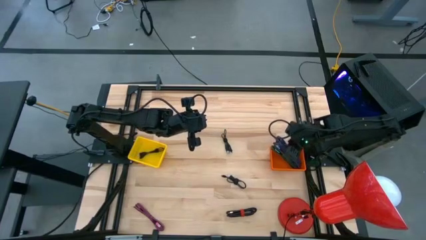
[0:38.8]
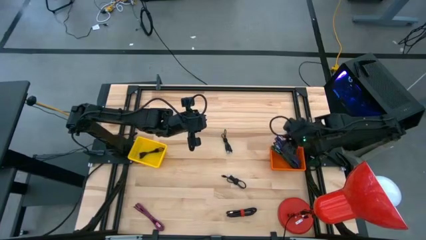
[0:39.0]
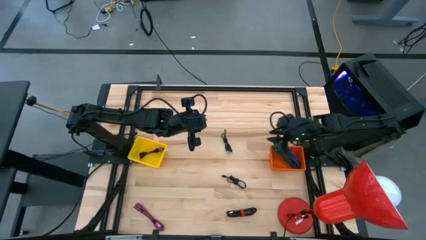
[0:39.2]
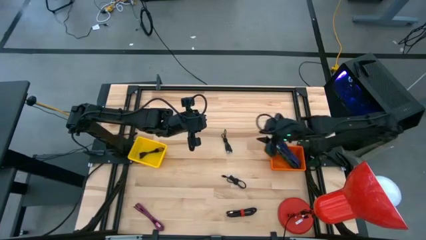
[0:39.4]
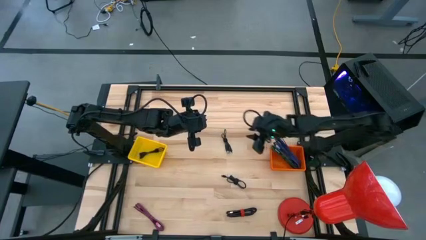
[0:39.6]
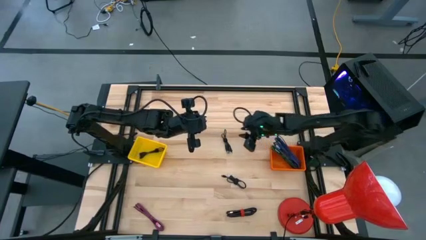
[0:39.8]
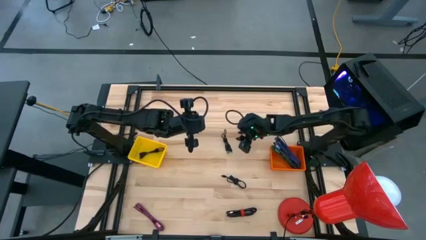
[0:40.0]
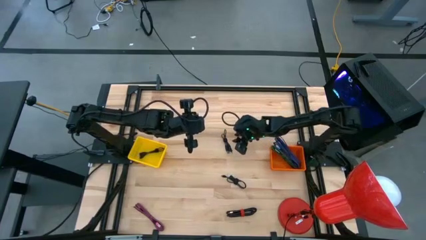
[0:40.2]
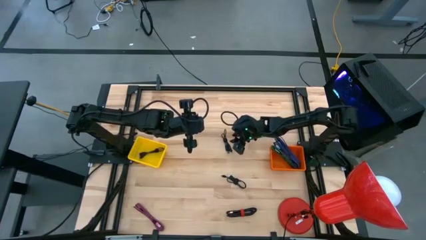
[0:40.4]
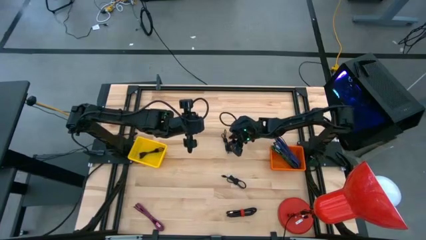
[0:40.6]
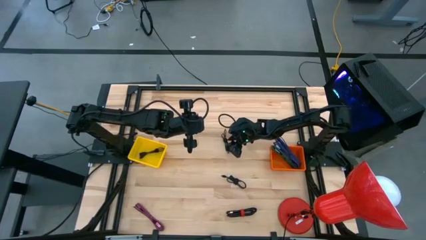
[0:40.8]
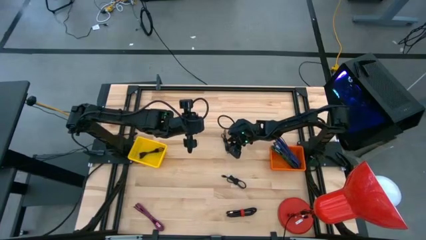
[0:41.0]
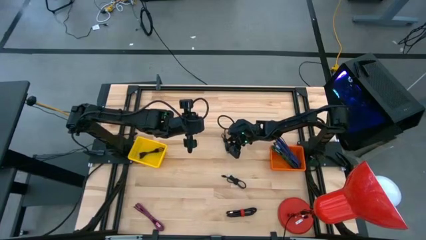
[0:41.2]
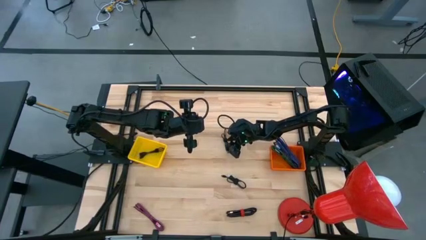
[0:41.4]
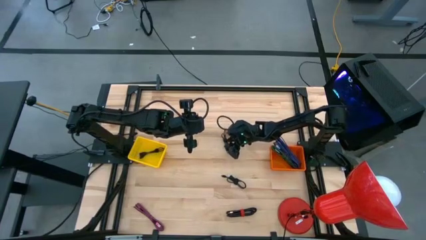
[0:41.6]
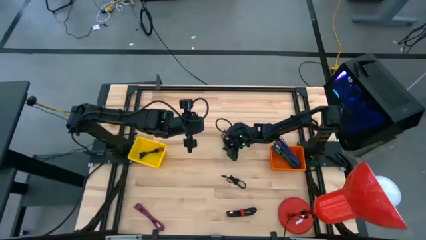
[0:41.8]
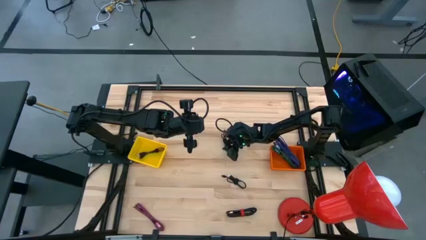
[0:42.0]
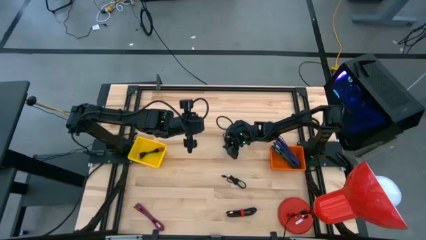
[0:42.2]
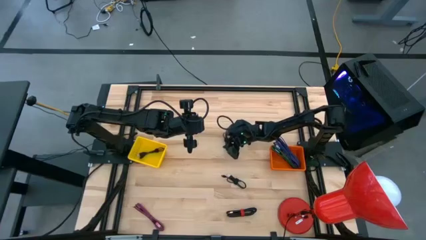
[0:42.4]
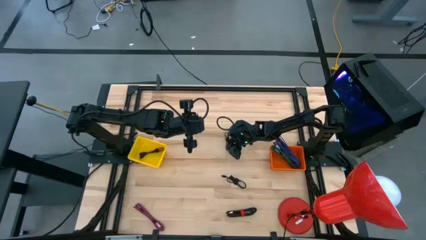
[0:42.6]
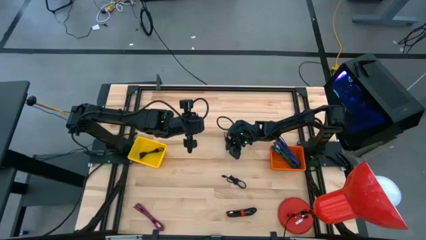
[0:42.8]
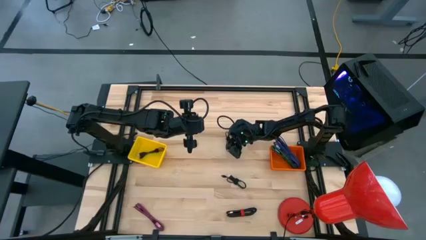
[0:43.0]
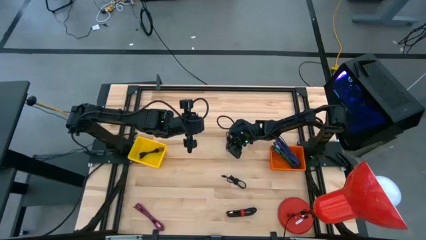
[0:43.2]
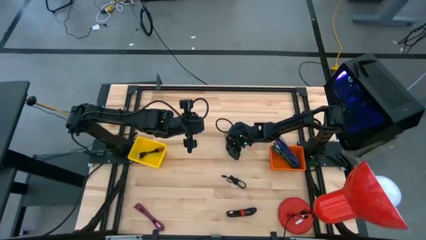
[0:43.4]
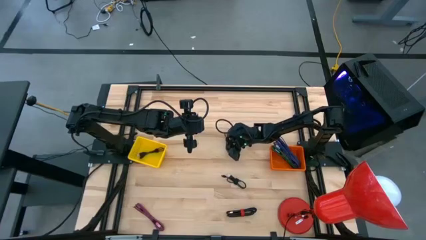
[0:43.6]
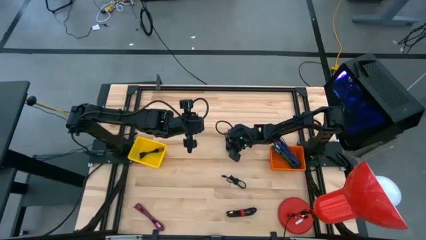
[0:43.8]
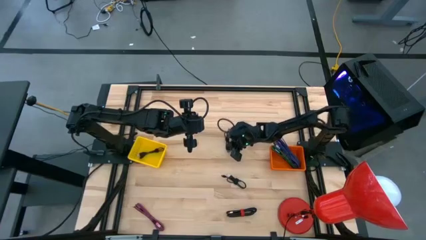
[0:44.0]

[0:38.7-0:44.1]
Task: Pick & Place USB Port
Put the black charger cable into the yellow basket

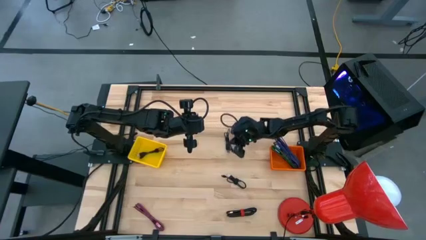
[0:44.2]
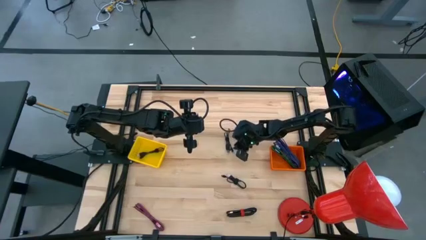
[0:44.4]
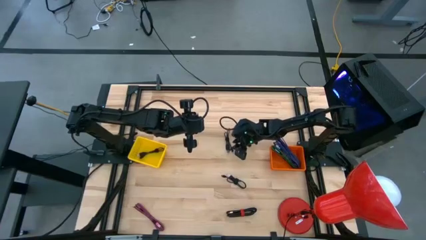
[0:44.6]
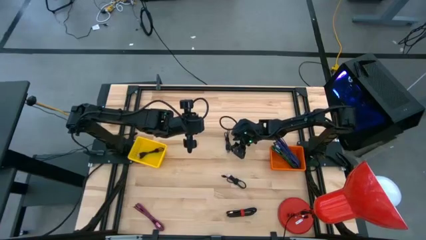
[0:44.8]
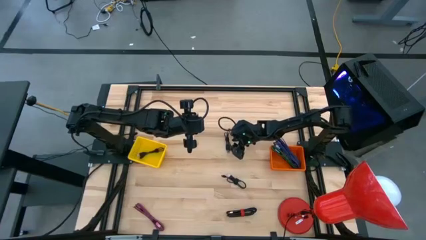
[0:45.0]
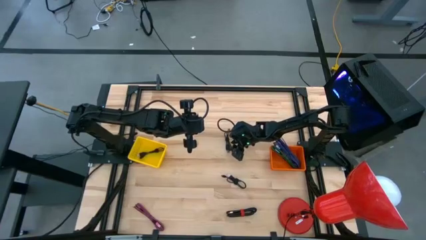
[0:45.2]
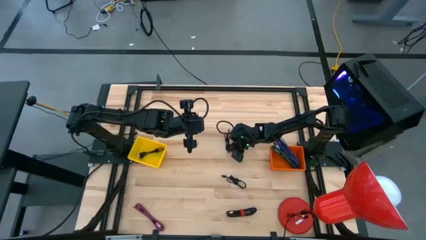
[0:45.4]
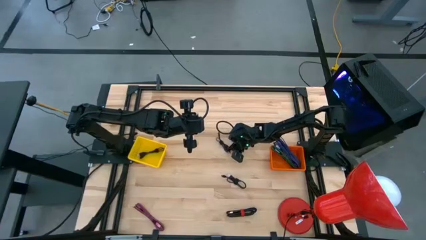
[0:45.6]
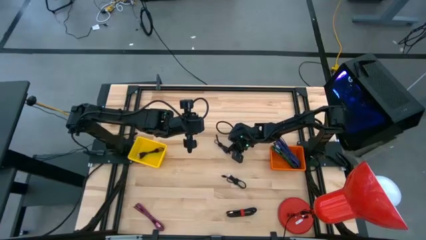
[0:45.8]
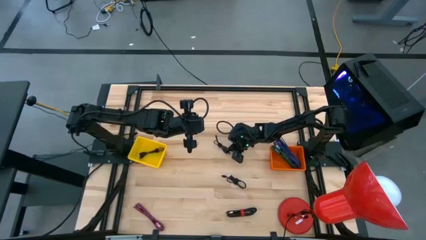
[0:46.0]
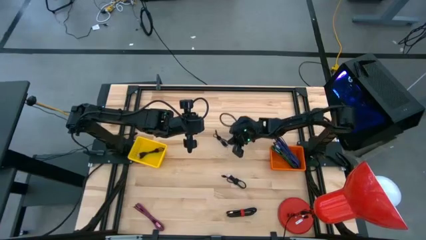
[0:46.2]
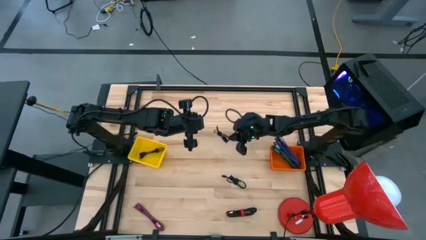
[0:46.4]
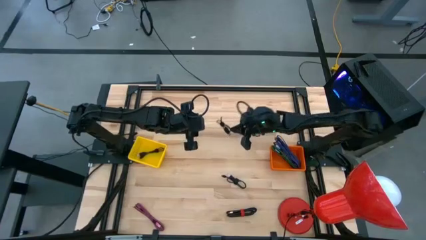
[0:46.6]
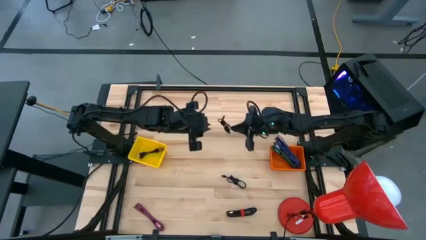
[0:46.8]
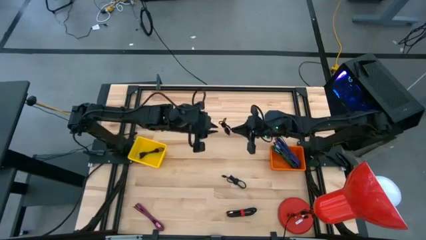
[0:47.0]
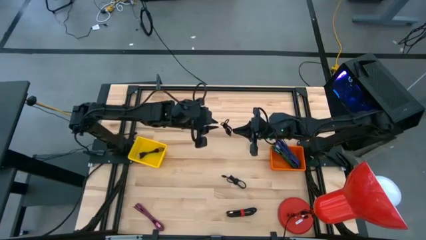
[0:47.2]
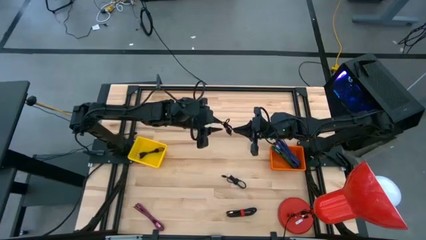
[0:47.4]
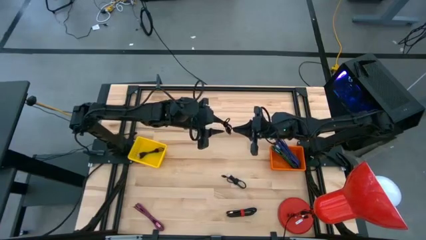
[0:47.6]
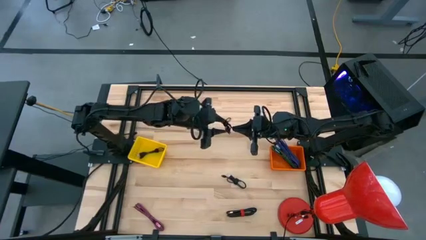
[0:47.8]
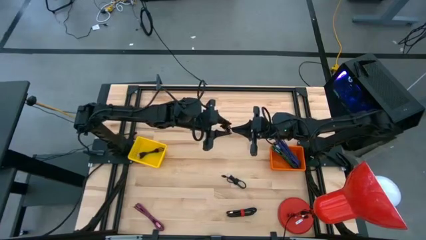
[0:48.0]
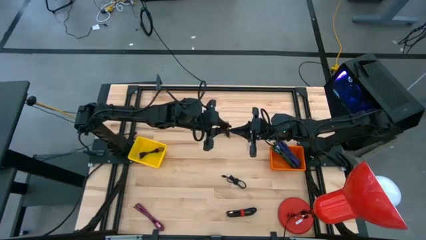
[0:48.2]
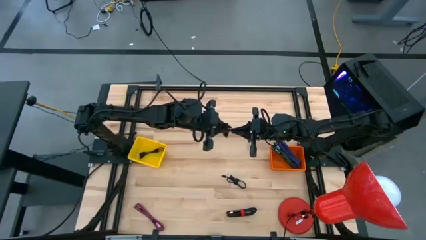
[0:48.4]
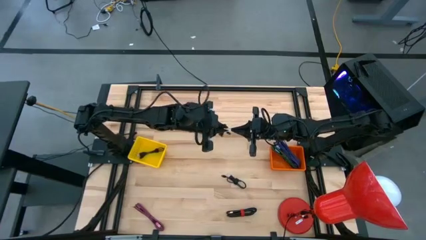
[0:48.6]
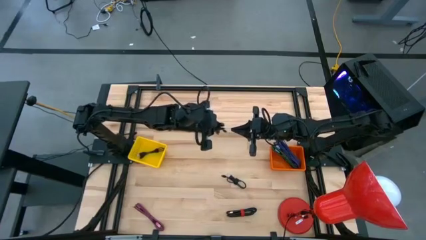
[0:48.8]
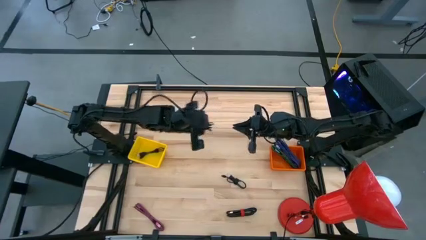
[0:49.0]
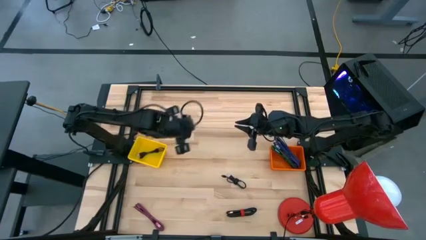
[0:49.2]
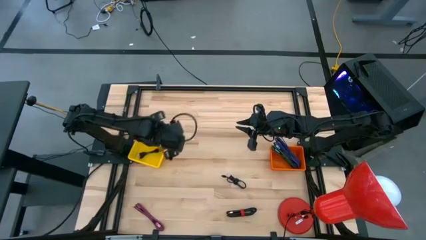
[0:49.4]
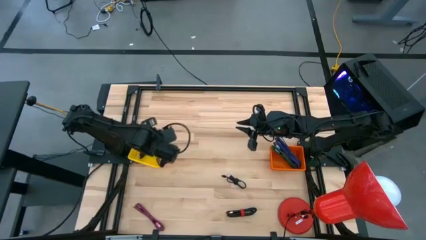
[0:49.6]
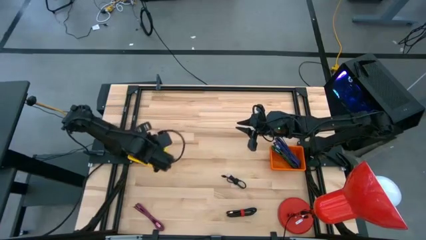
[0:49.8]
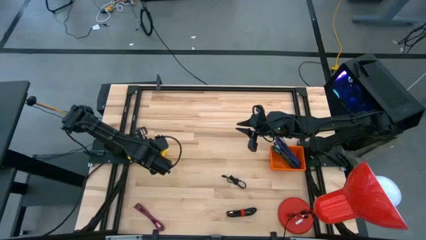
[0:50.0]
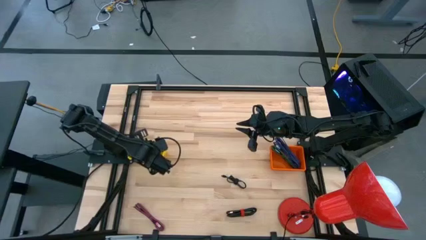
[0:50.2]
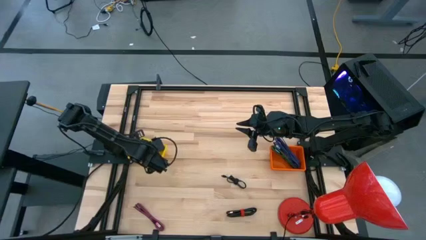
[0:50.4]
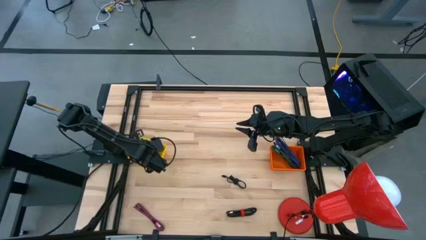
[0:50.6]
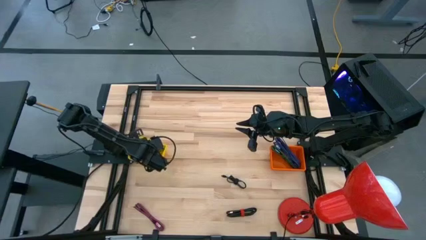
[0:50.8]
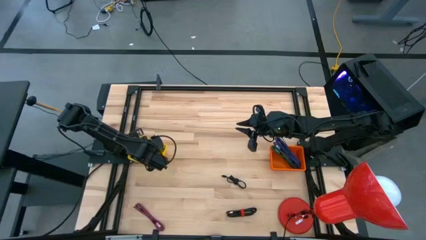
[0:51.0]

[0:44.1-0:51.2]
Put the black charger cable into the yellow basket

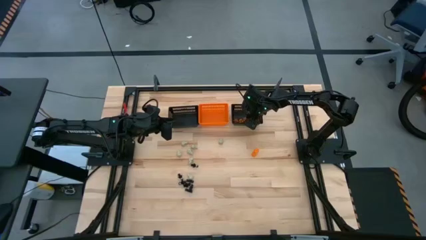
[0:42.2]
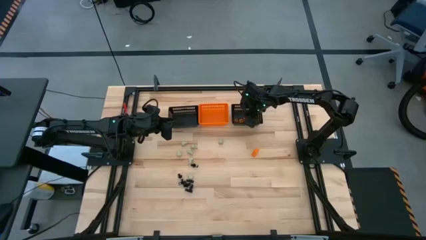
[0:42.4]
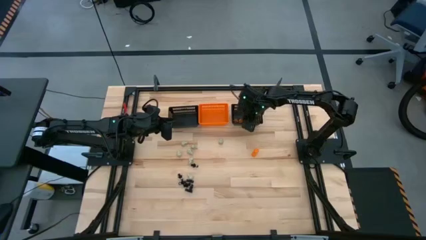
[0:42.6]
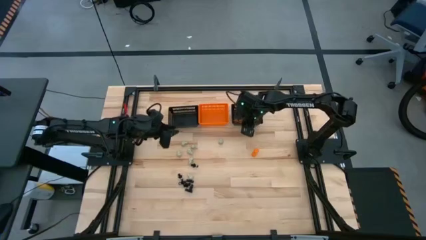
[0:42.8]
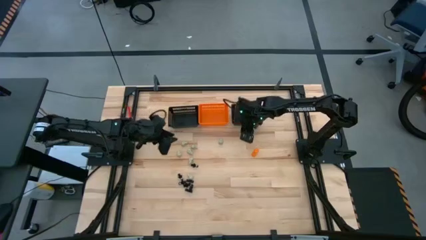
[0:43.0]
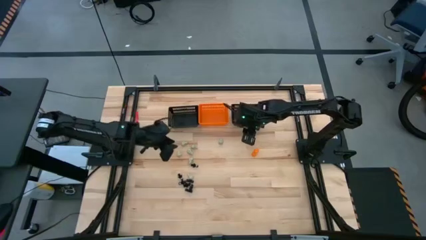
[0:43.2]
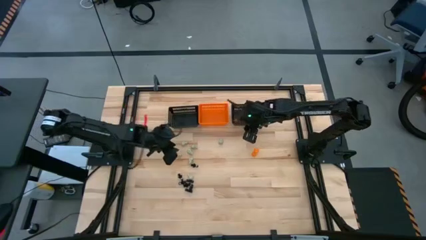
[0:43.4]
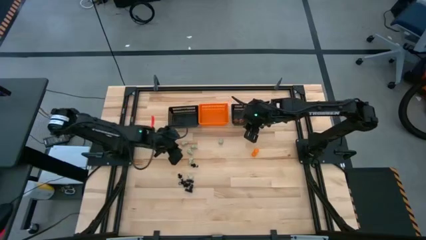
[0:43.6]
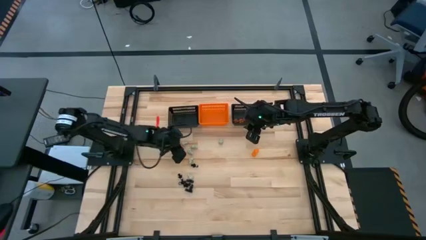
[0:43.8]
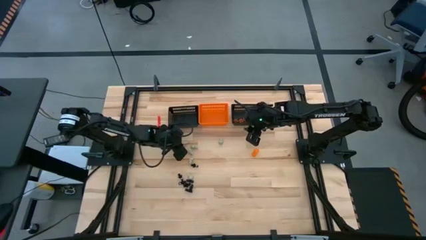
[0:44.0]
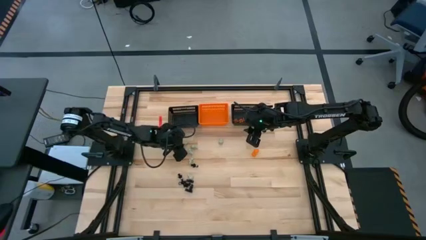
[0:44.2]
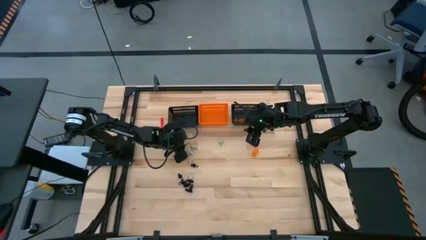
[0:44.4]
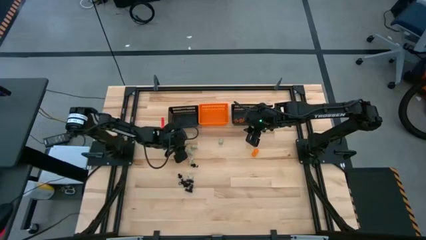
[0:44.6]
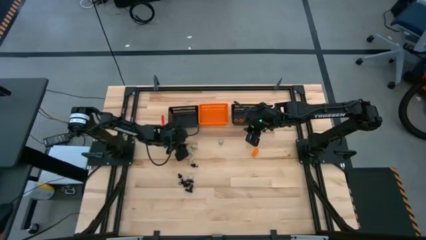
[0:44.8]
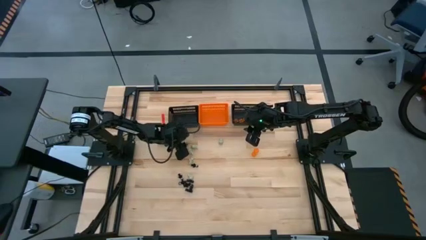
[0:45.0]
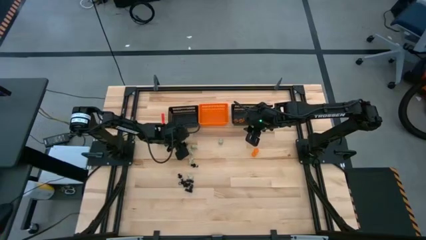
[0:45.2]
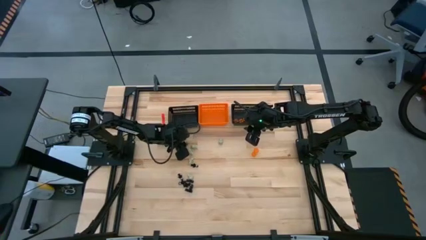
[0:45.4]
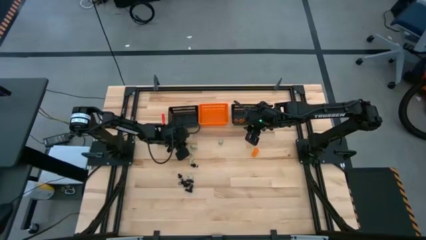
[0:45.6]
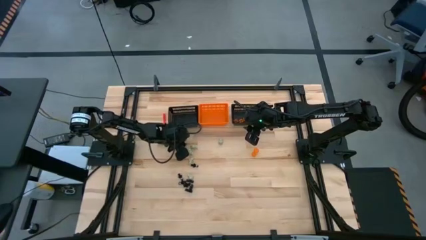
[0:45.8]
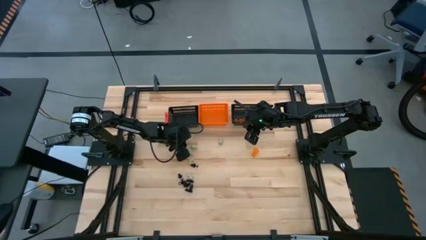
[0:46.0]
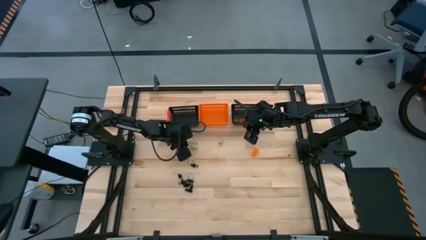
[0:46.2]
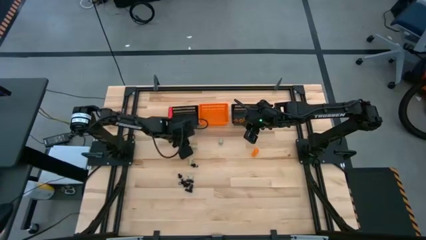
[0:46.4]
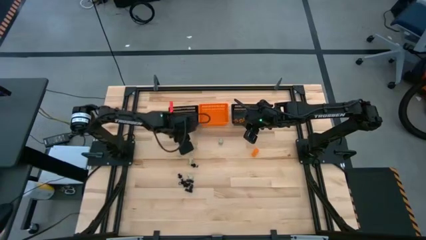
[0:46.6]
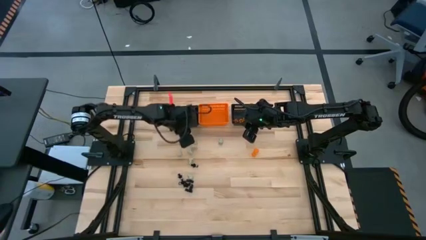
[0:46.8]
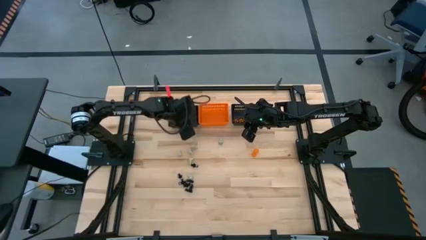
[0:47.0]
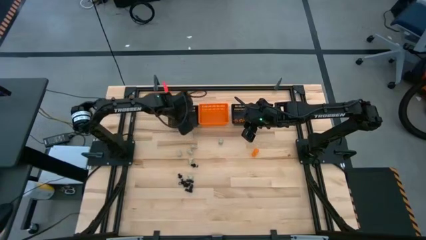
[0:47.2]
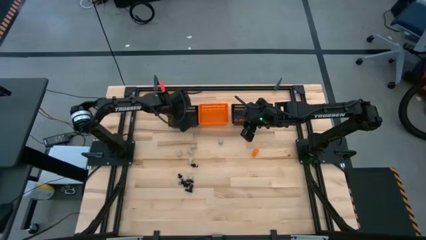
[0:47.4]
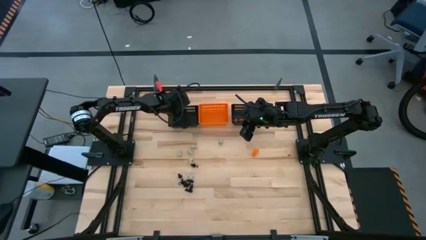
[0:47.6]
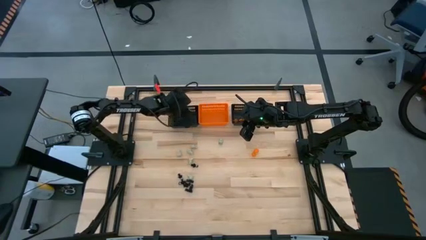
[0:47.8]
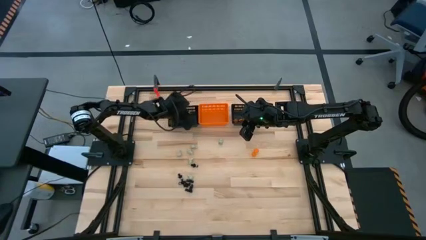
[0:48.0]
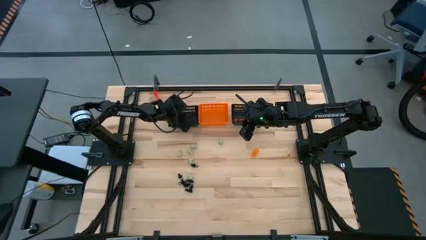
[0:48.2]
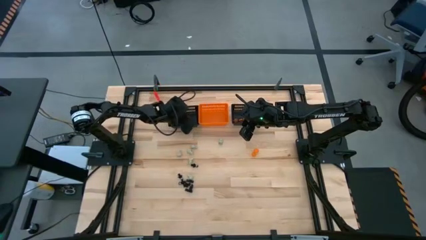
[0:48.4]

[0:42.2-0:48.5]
Task: Sort Halloween decoration
Put the white skull toy into the left black bin
